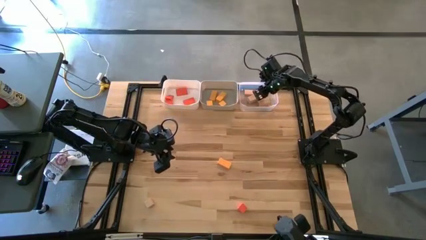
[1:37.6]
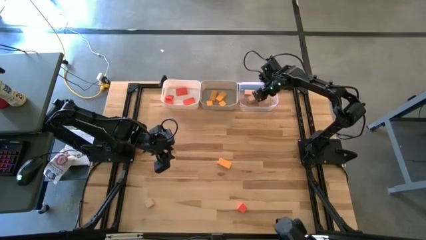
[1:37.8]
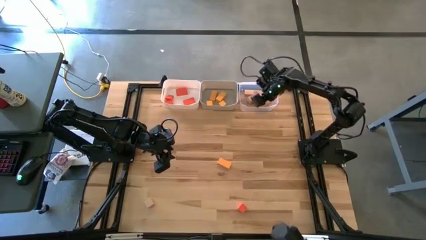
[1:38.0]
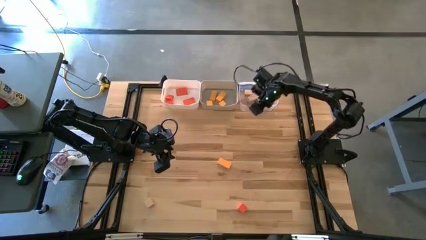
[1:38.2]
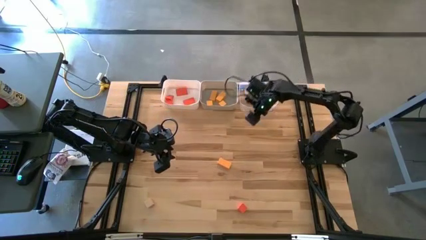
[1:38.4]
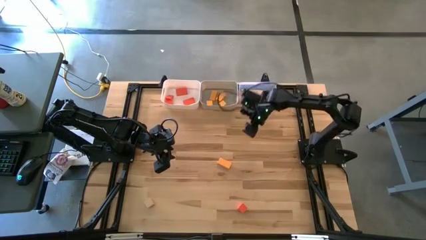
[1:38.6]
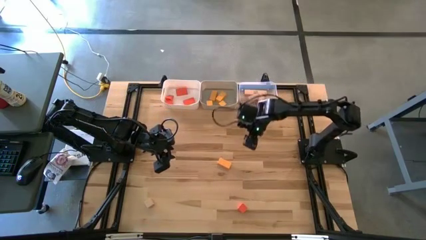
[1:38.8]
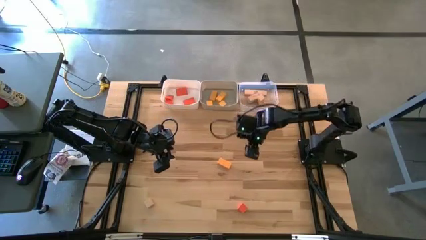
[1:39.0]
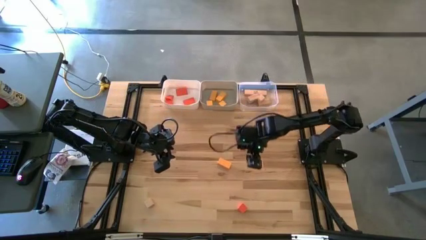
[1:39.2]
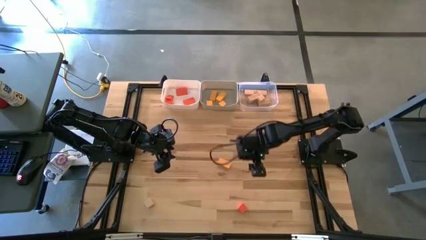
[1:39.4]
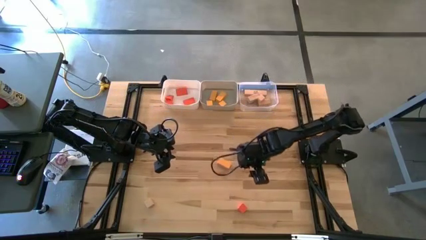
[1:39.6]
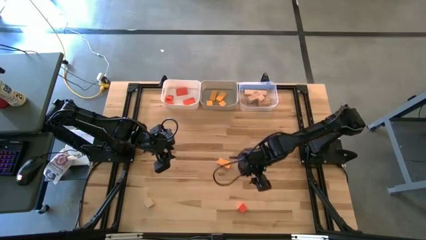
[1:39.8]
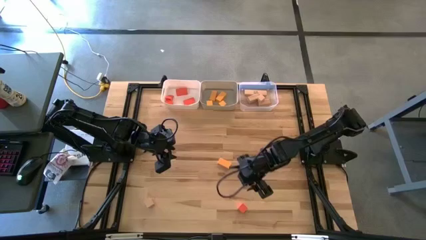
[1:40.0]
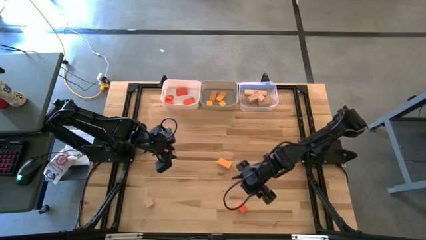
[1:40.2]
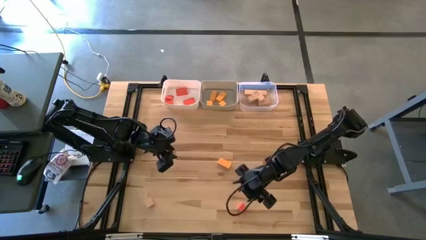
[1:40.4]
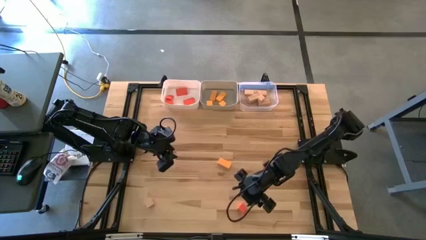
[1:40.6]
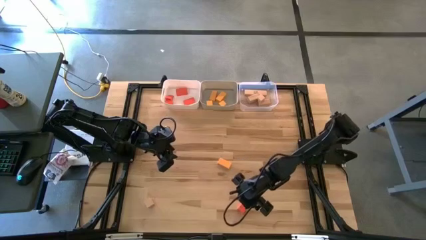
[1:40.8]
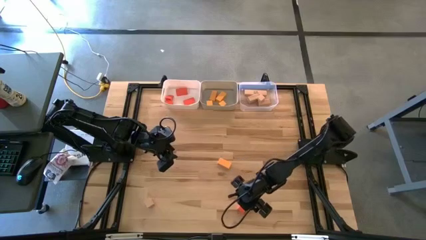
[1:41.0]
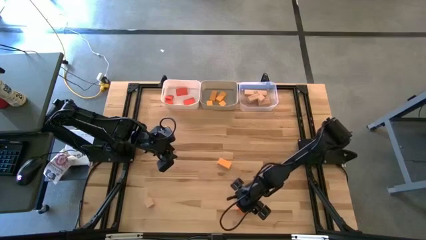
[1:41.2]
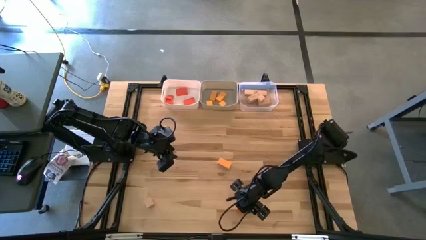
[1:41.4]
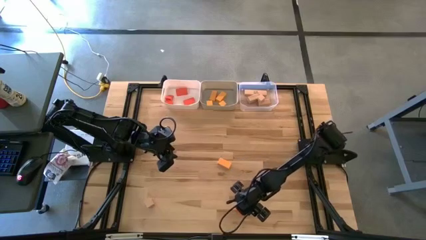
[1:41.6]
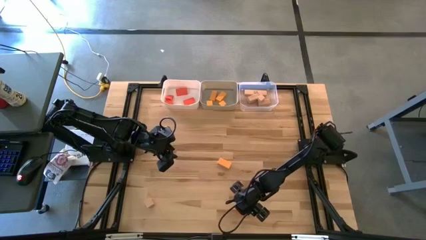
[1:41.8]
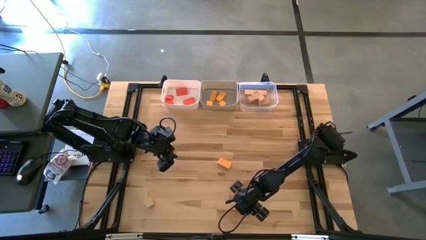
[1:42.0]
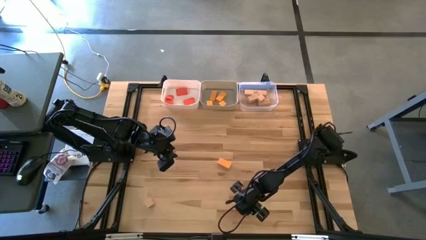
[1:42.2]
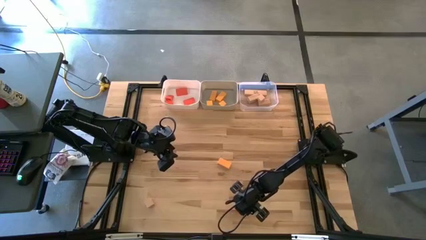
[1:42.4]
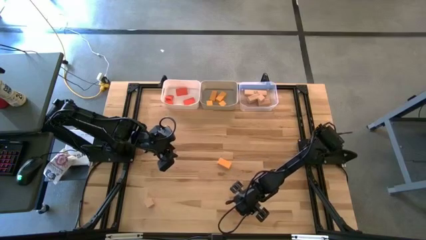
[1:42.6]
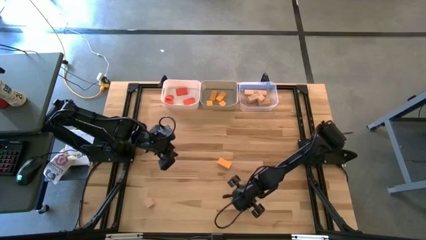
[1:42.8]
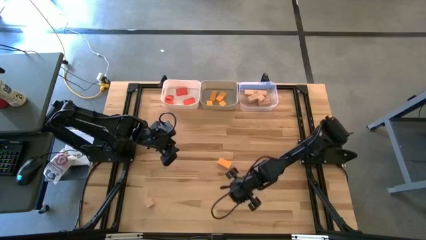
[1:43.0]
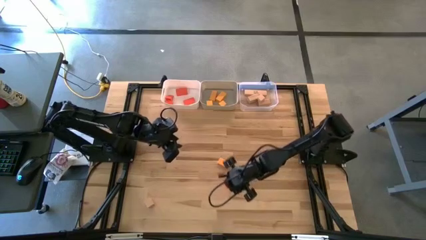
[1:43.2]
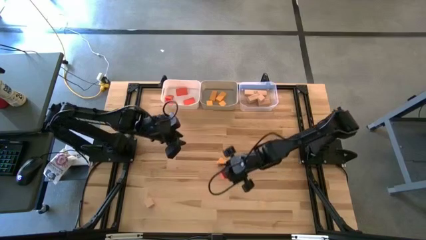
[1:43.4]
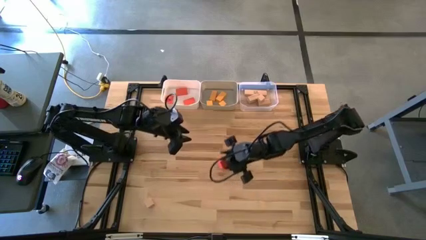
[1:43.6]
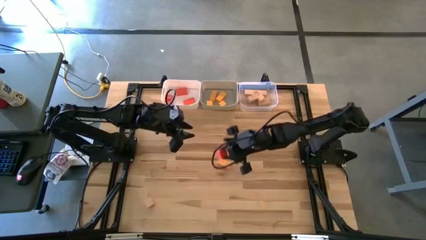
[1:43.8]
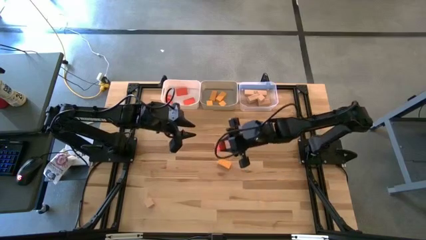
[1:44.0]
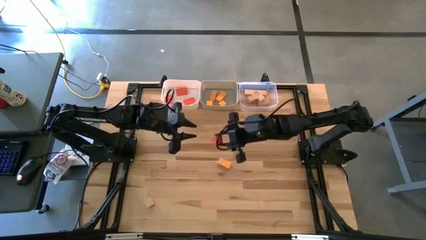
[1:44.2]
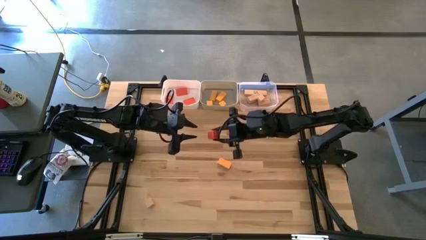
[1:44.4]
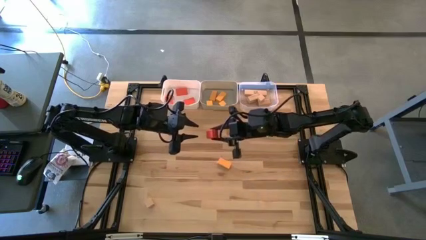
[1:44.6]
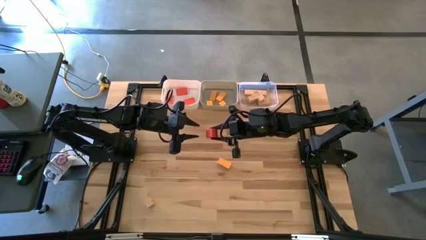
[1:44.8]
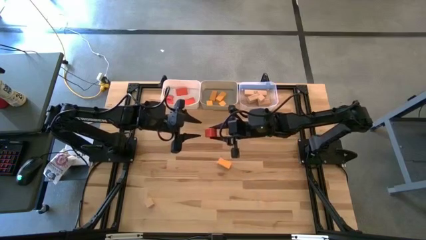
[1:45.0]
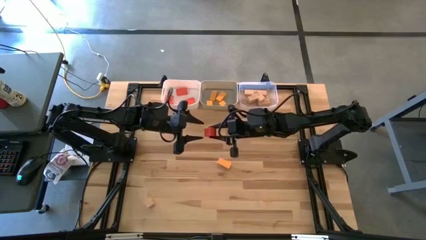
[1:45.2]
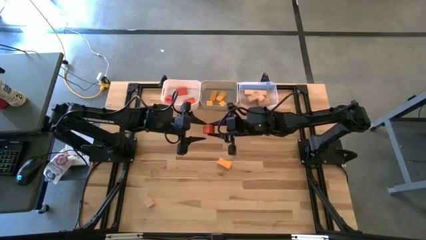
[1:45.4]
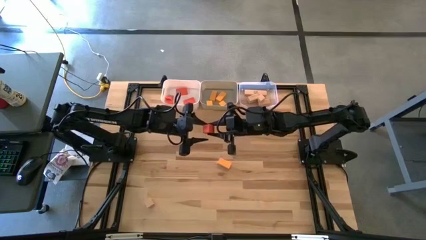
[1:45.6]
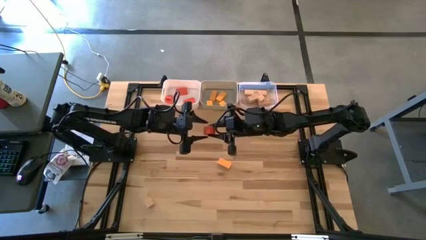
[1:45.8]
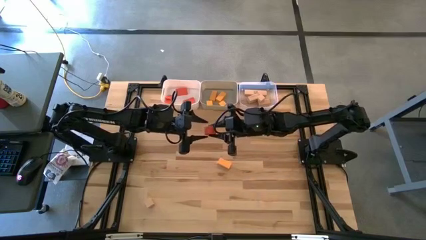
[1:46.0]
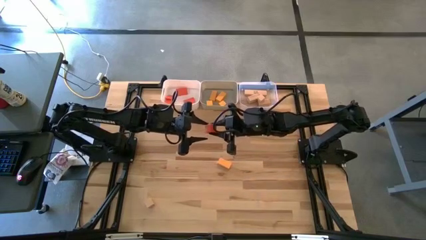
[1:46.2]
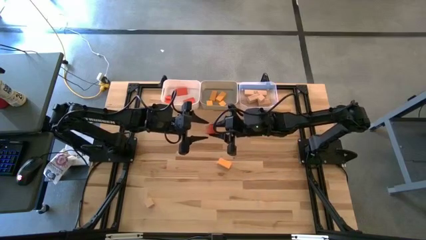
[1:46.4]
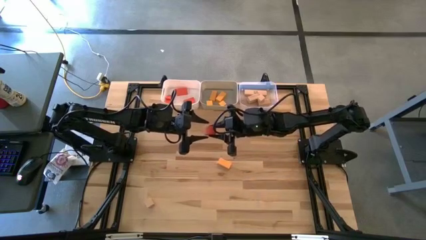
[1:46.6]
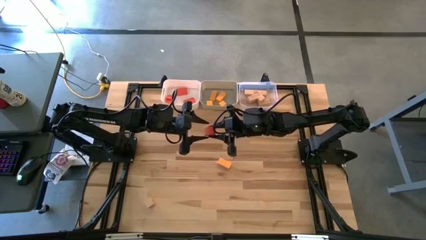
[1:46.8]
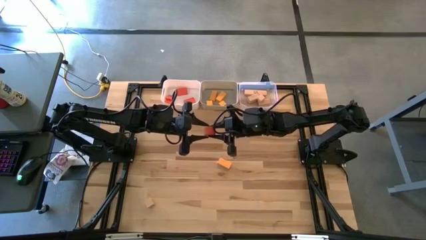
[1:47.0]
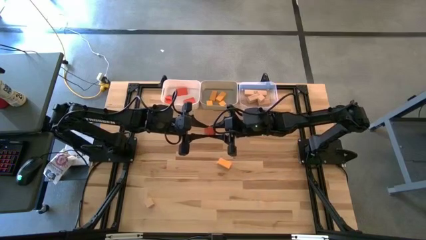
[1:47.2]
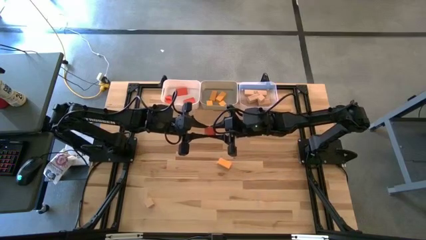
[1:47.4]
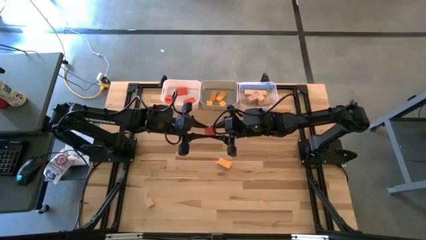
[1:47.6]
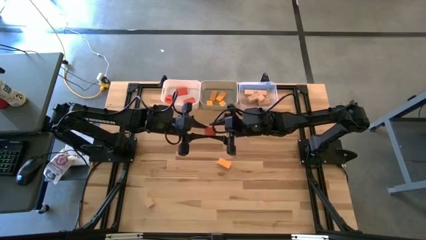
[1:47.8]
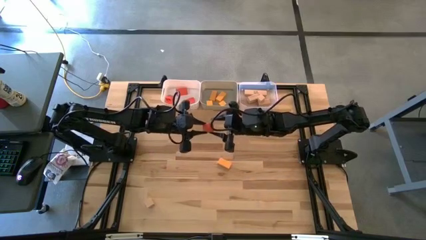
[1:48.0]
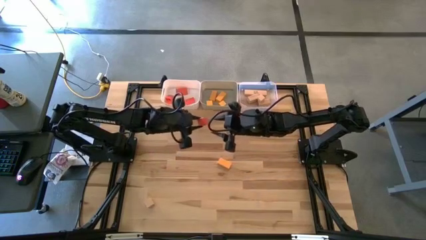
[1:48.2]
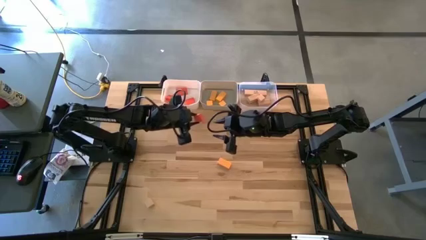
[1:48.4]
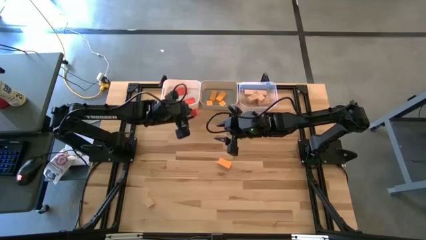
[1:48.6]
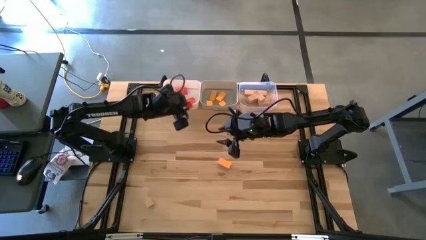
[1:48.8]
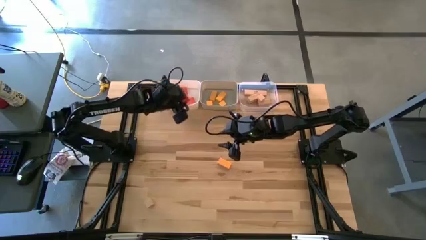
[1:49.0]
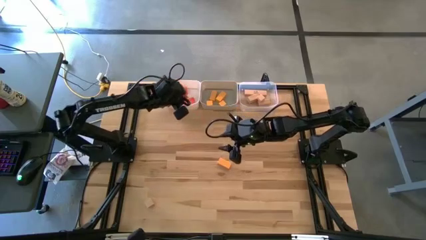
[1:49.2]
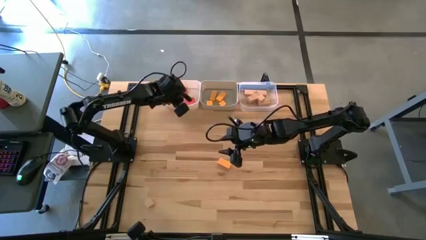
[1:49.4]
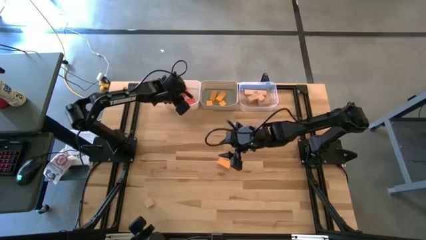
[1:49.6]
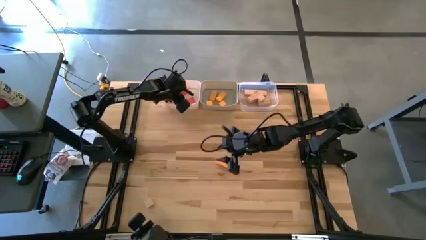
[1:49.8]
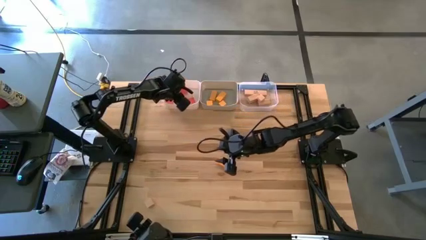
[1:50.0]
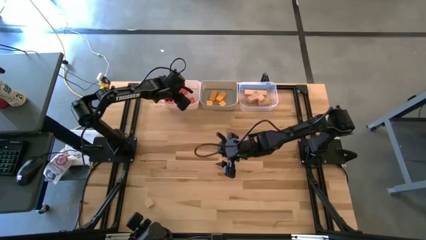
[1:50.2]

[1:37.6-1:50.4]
Task: Sort & place blocks by color
Put the orange block into the white bin

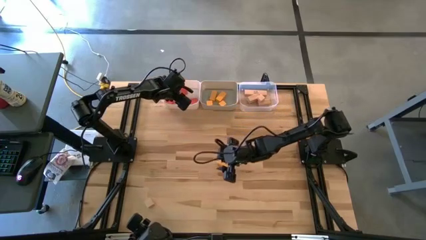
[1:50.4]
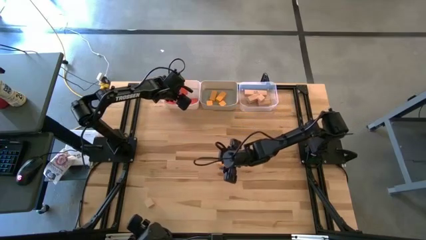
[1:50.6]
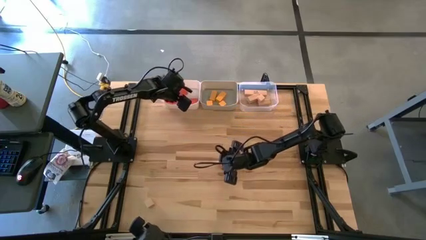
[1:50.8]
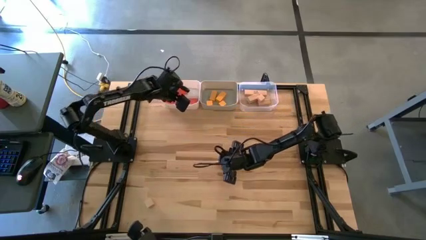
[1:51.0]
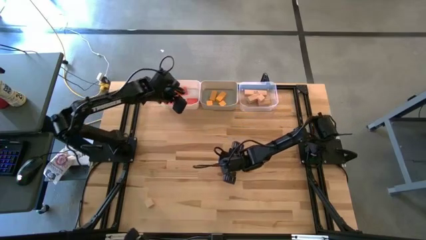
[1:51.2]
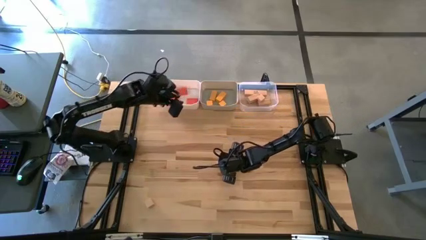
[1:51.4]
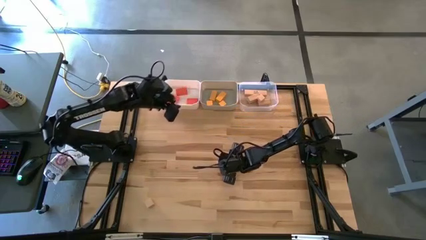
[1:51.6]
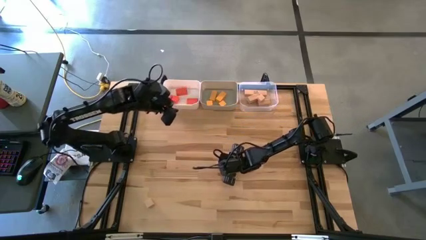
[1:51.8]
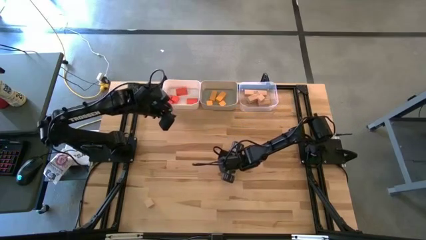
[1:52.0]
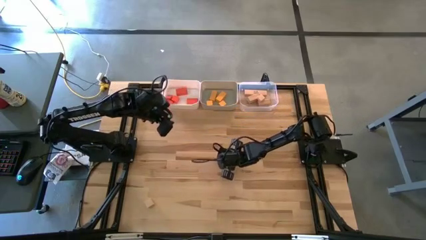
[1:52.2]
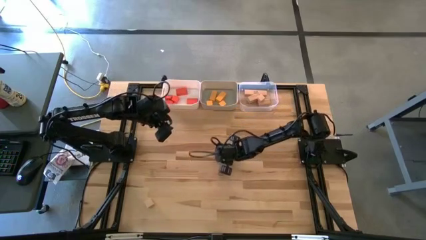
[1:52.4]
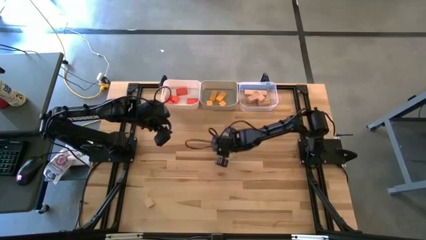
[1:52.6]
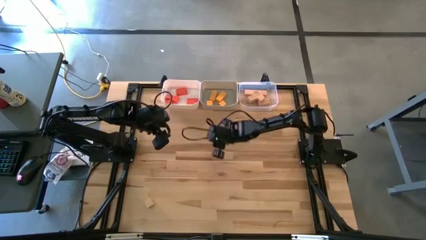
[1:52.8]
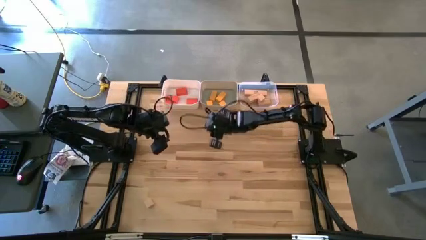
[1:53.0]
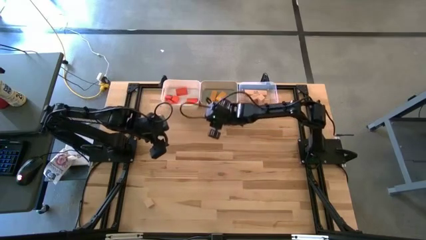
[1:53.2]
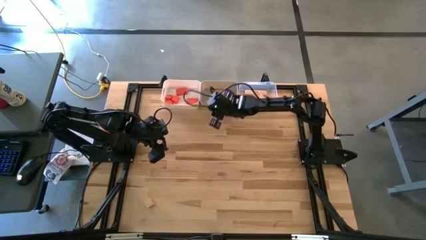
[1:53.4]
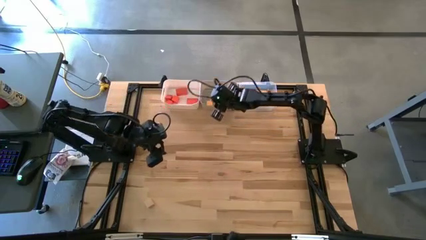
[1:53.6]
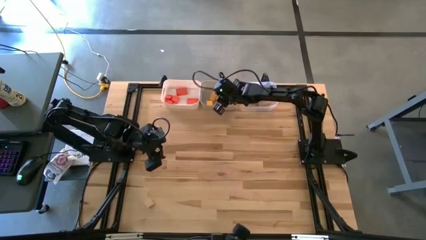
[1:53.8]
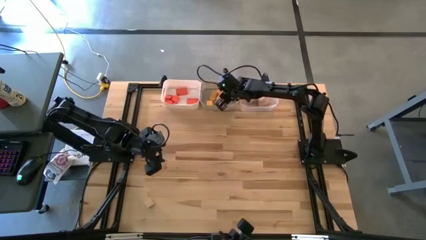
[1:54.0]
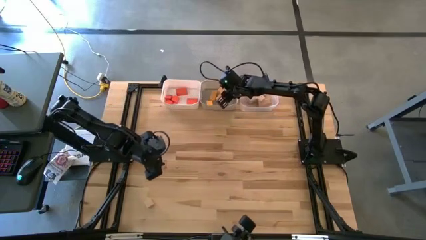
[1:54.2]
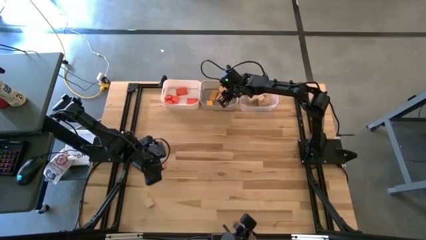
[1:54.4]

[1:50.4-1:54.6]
Put the yellow block into the gray bin
